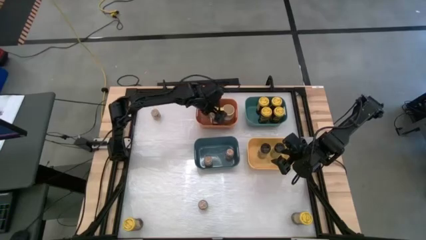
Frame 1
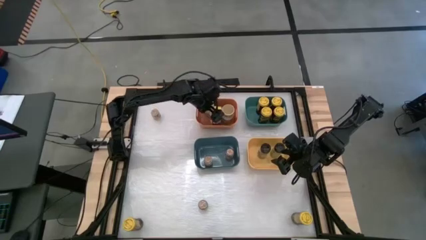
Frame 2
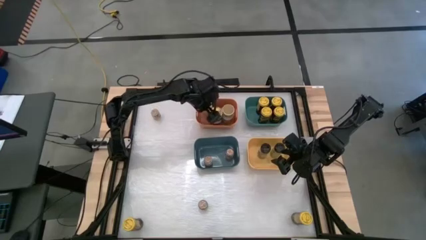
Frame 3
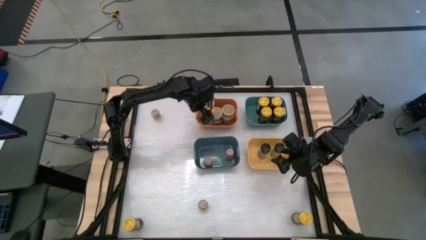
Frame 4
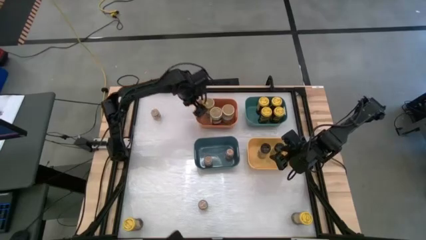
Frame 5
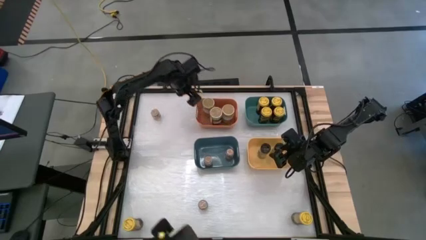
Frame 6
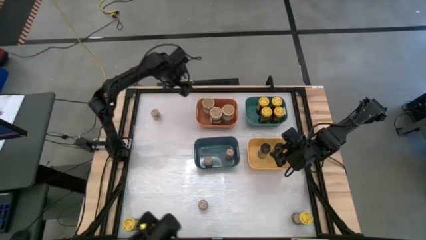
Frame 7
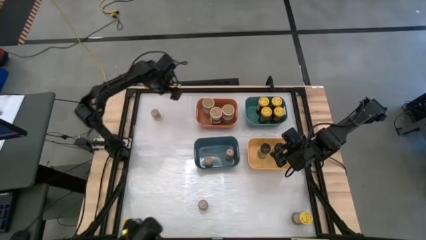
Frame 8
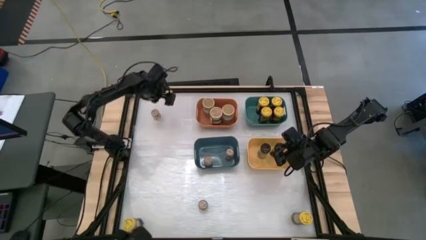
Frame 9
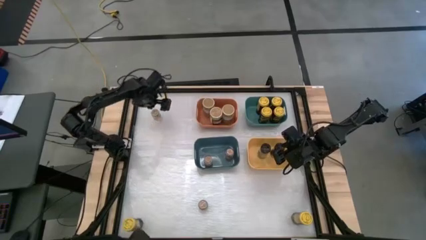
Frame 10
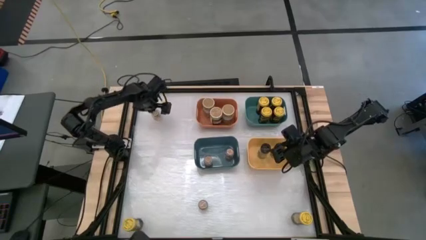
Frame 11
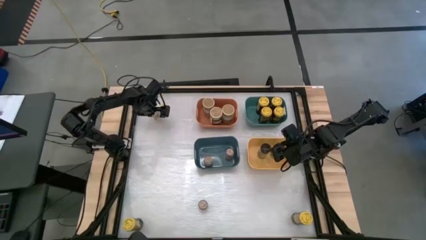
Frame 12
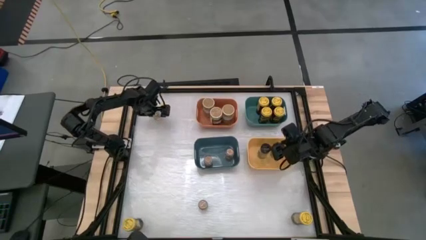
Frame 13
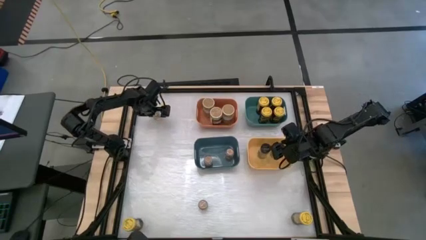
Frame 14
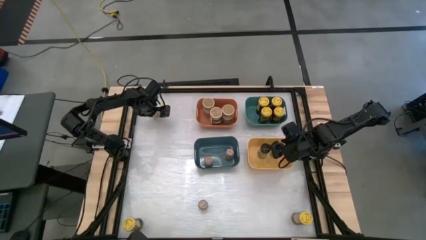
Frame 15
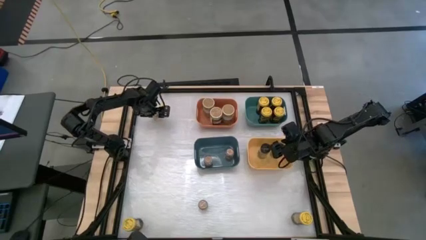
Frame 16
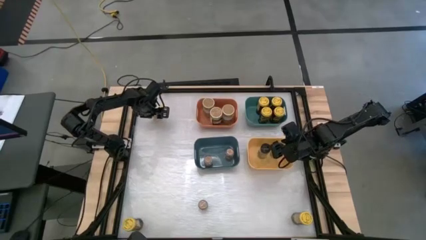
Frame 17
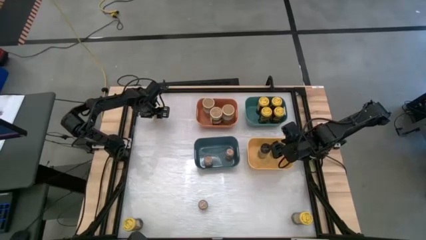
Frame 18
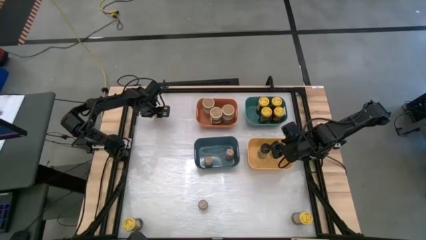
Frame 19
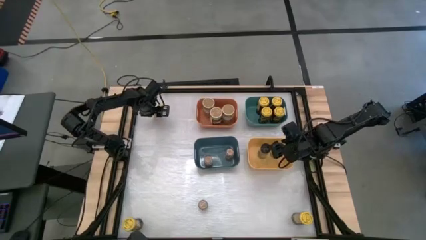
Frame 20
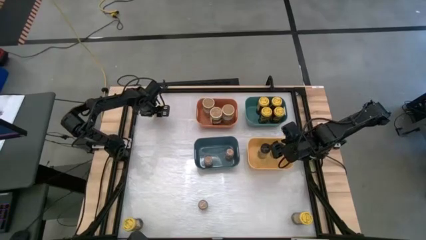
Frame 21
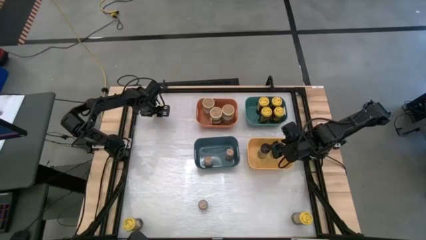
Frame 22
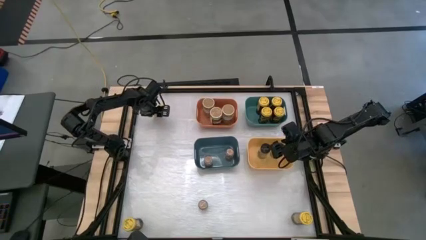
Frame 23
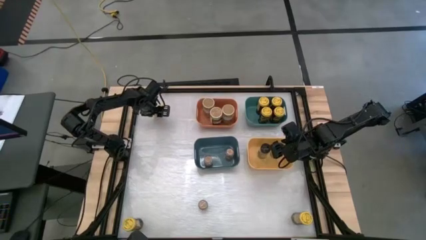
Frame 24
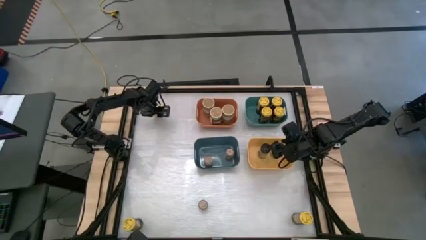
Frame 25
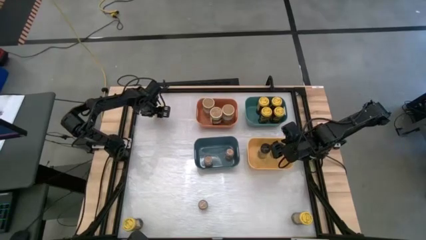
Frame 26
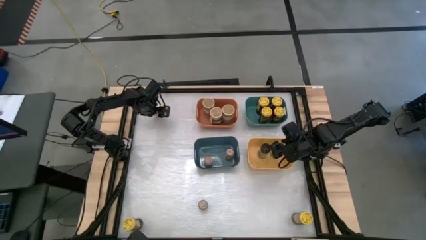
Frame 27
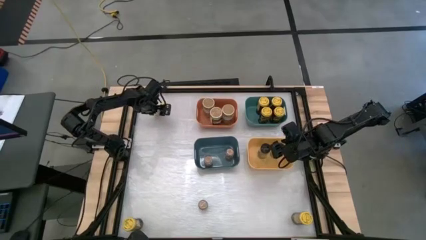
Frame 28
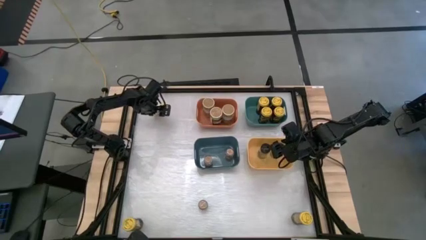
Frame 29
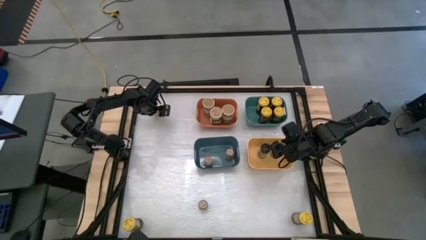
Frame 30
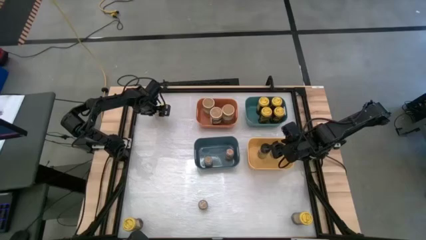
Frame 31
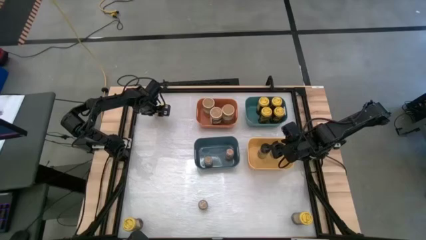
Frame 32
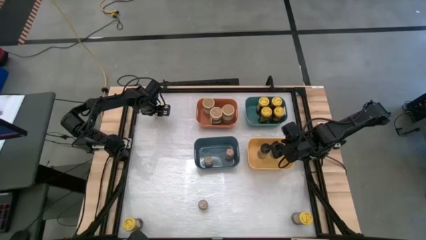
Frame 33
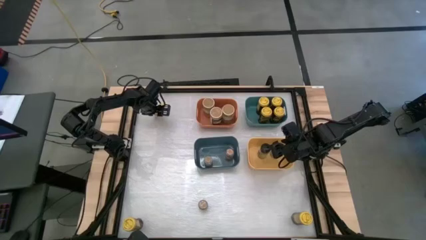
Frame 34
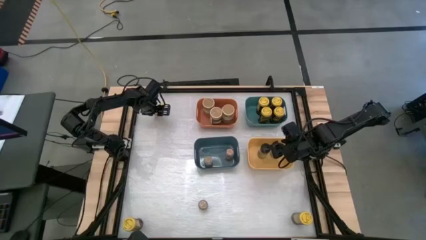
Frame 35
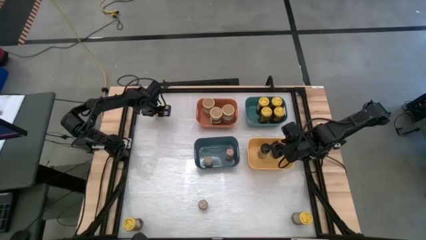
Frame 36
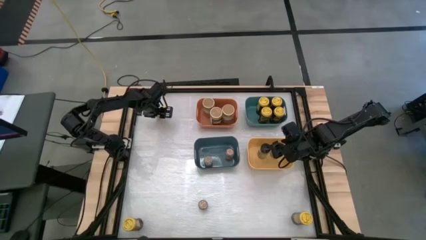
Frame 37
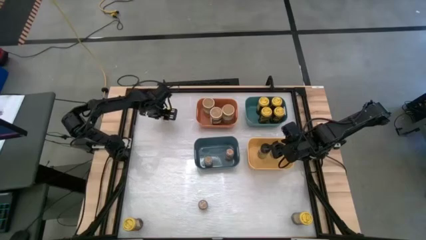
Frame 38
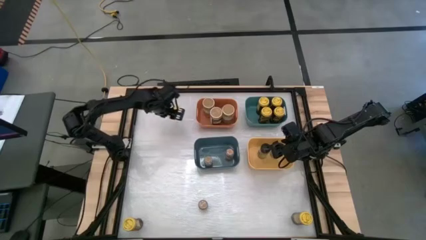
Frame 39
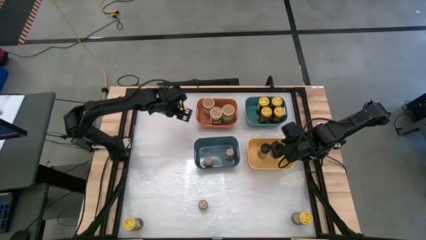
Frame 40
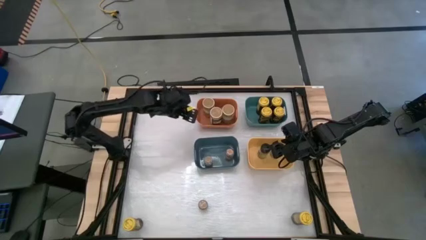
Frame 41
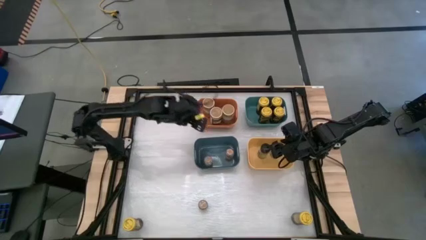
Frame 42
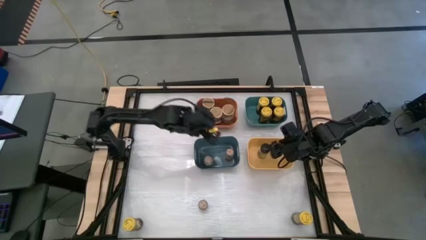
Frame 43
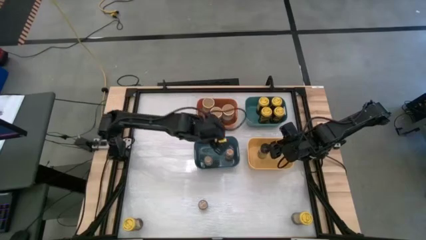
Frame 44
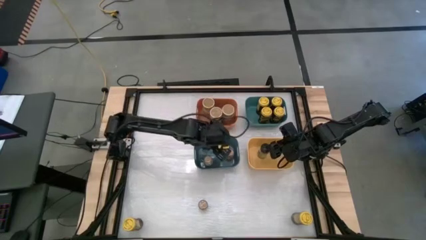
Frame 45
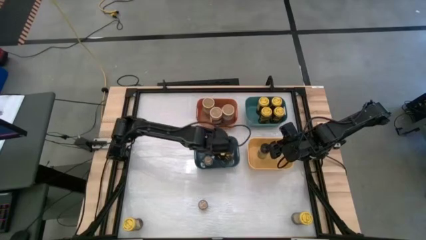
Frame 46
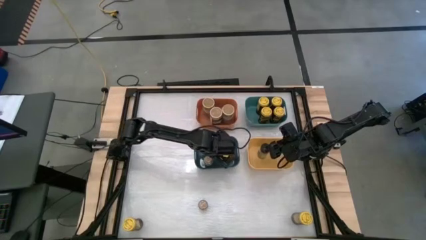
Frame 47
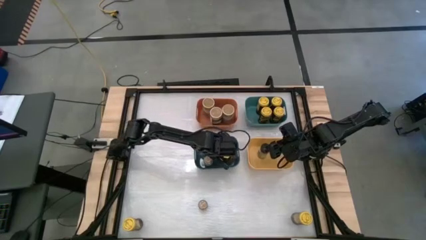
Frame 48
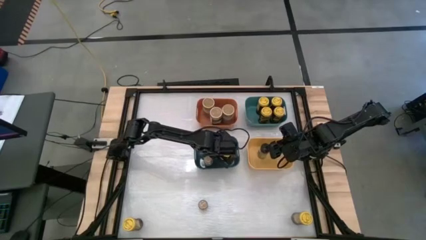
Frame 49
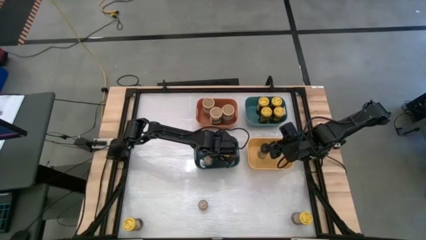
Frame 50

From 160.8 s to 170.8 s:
Task: Sort spices by type
Put the brown spice bottle into the blue bin

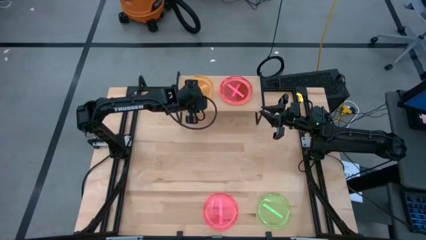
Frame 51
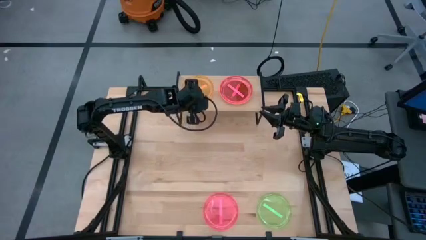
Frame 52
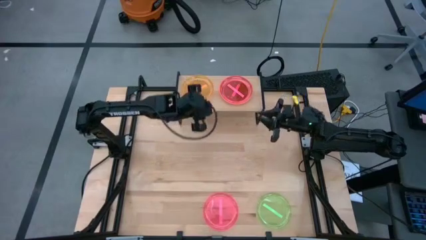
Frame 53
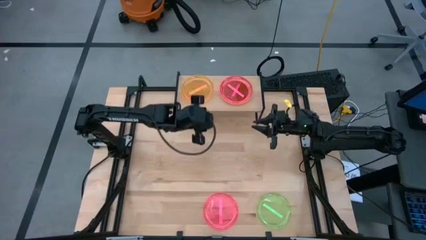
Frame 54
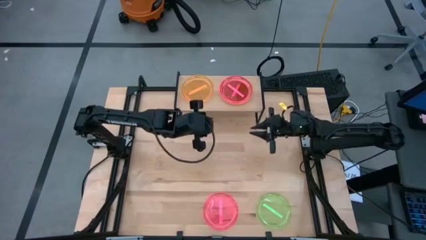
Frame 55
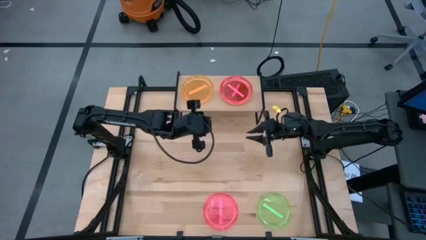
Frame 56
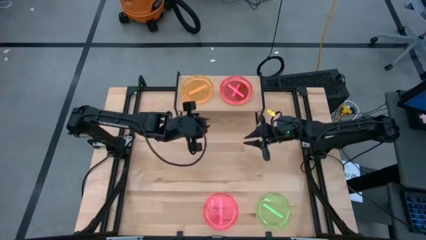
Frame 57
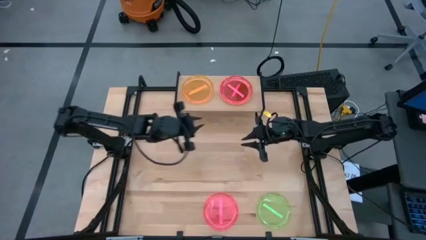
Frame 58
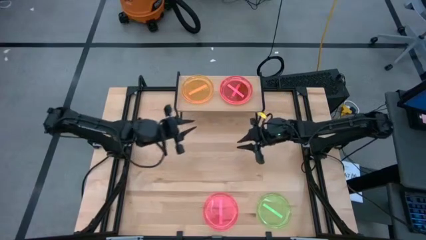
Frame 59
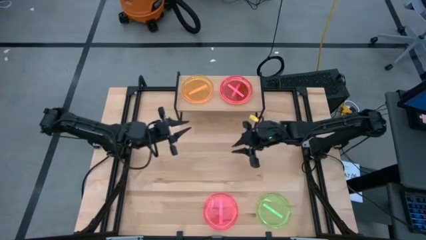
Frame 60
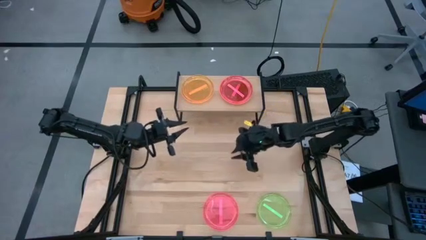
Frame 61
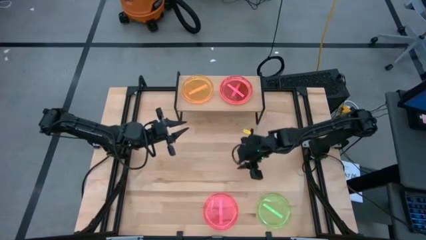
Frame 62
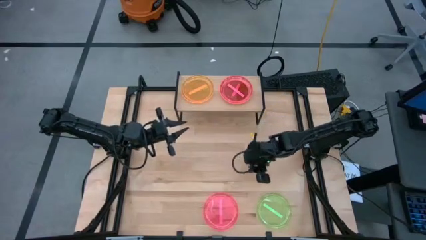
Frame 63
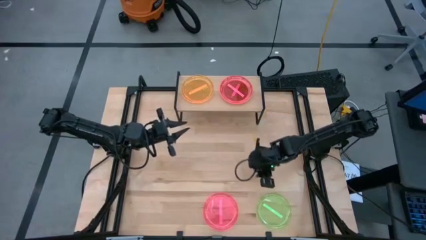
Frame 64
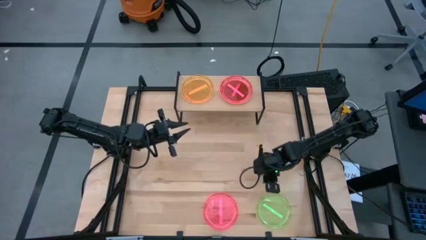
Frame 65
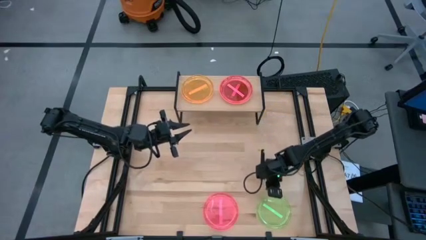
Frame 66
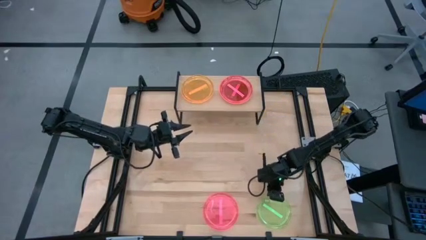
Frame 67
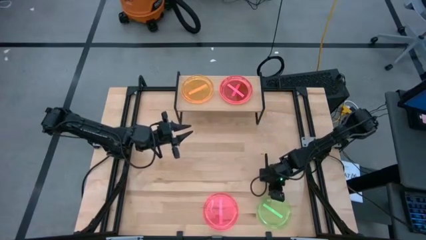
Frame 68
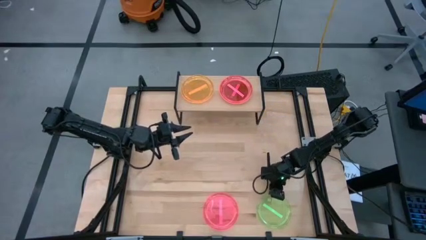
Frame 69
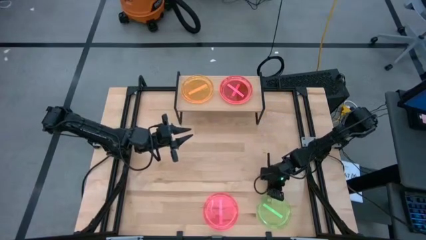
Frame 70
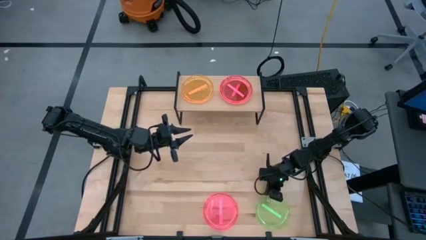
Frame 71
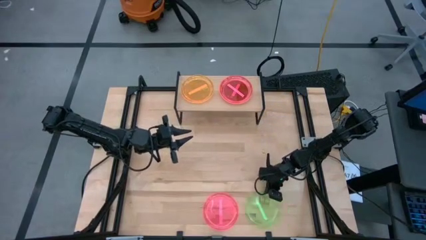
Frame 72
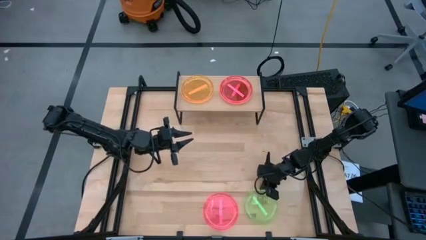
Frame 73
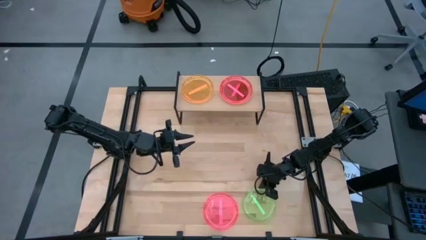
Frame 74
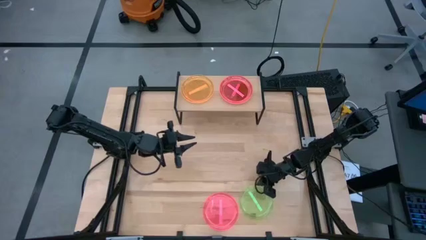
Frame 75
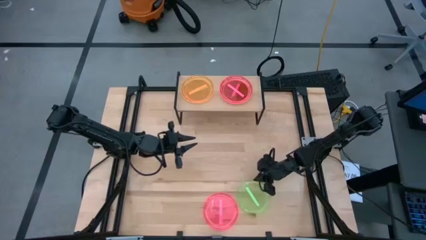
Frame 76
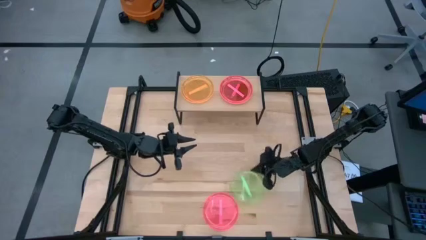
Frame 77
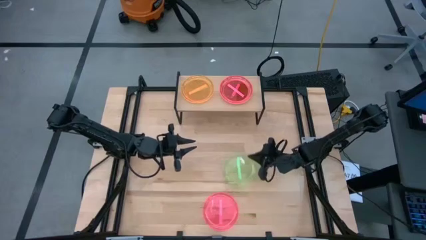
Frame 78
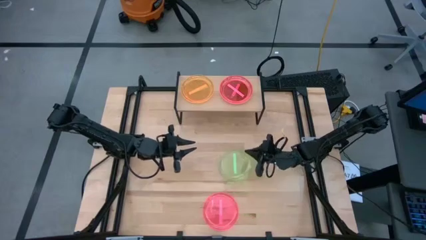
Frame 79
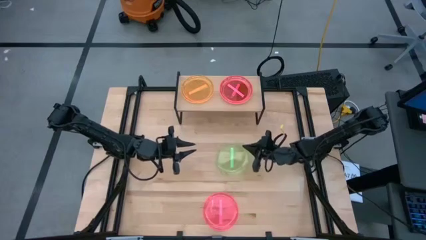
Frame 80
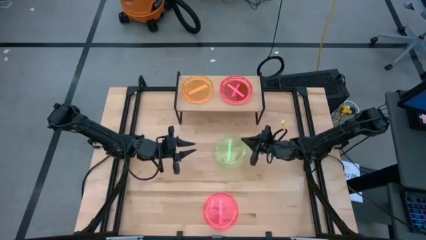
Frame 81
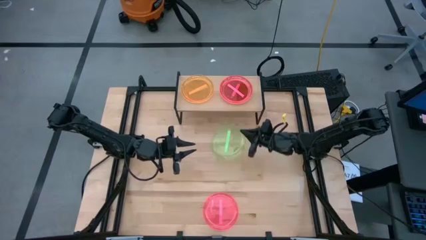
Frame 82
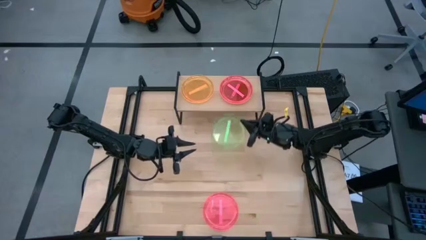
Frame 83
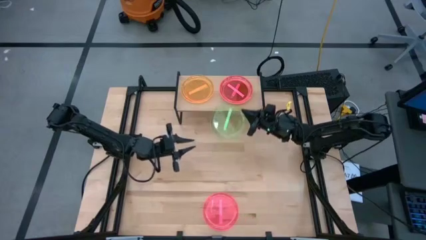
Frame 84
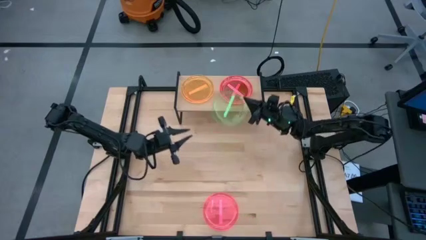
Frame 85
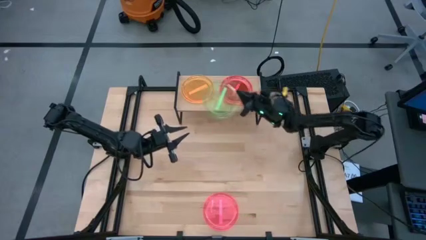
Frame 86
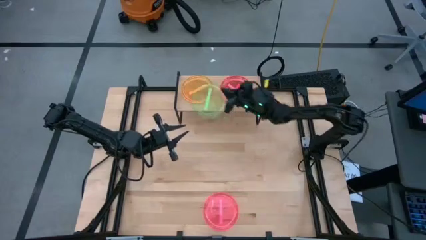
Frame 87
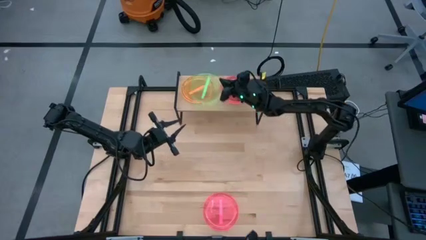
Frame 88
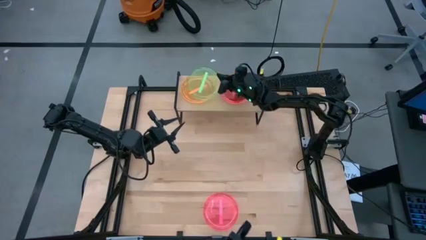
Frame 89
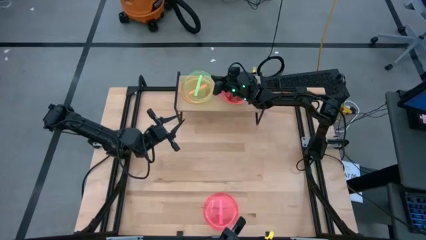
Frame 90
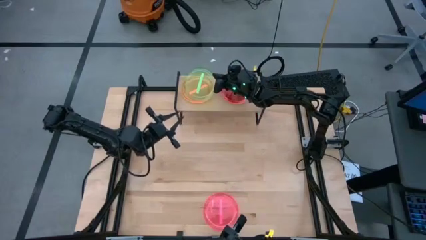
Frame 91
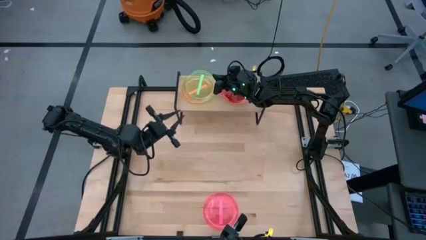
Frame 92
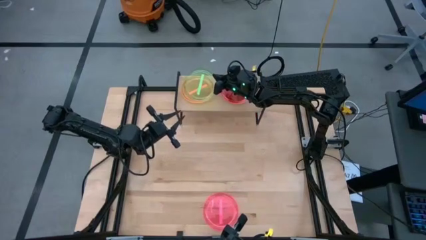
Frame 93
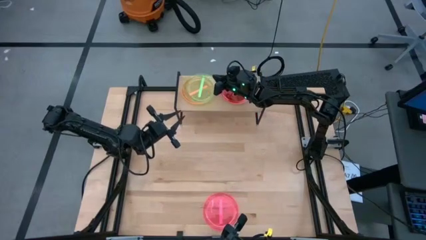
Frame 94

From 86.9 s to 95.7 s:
Task: Place and stack plates onto a shelf
Stack the green plate on top of the orange plate on the shelf
